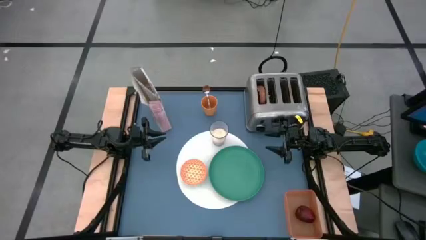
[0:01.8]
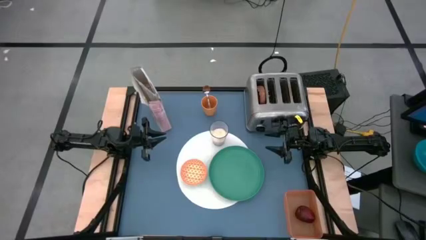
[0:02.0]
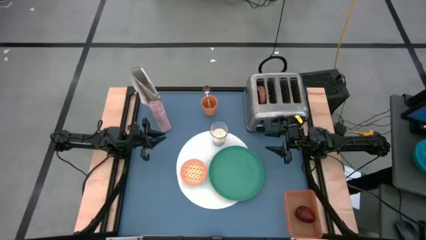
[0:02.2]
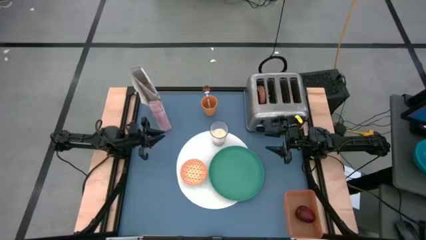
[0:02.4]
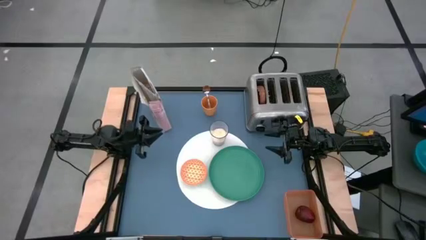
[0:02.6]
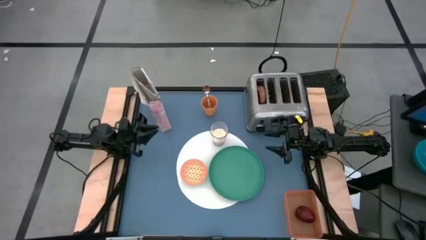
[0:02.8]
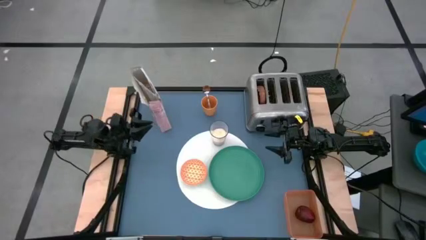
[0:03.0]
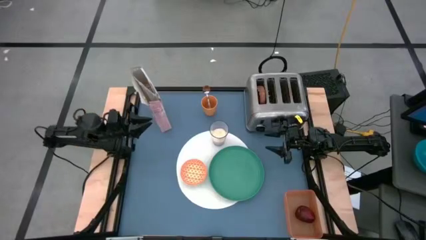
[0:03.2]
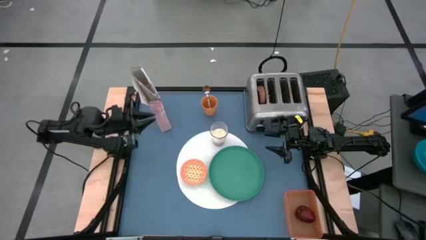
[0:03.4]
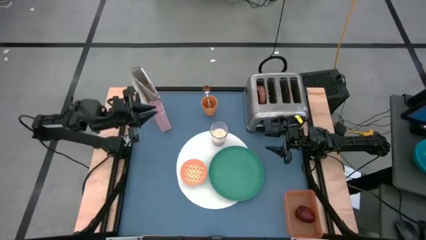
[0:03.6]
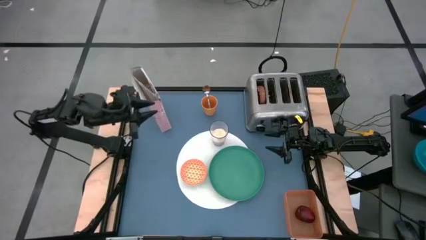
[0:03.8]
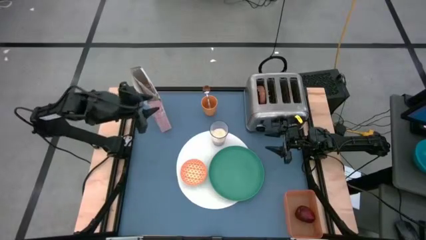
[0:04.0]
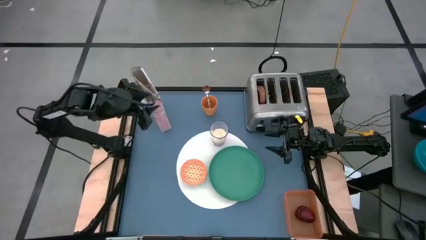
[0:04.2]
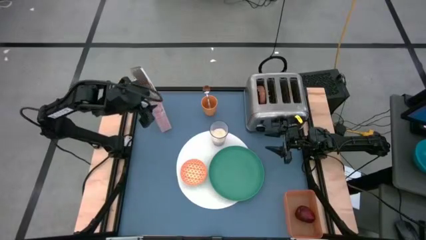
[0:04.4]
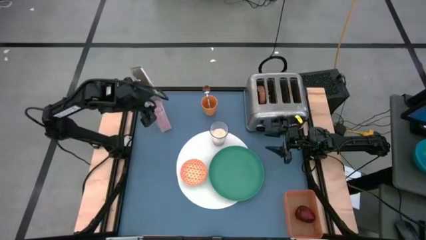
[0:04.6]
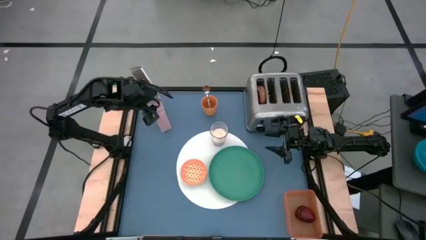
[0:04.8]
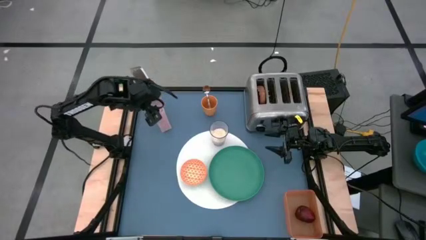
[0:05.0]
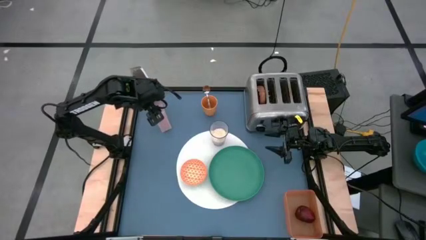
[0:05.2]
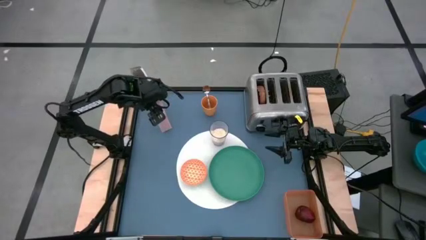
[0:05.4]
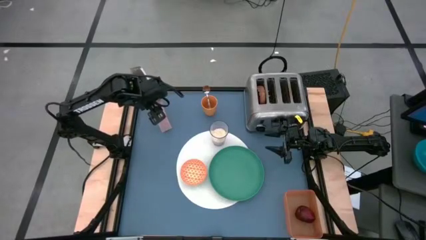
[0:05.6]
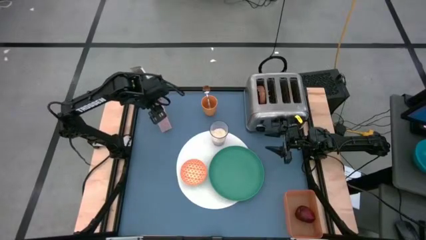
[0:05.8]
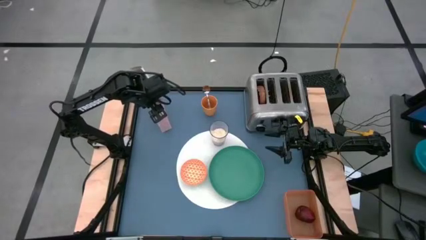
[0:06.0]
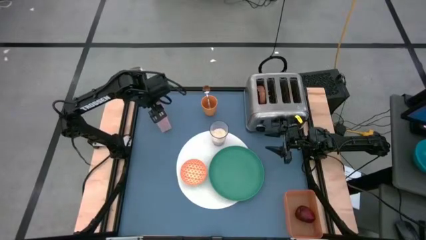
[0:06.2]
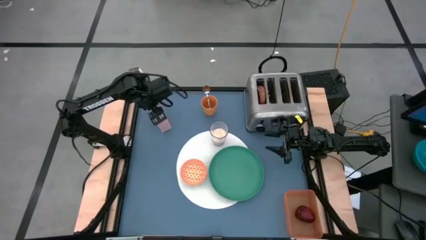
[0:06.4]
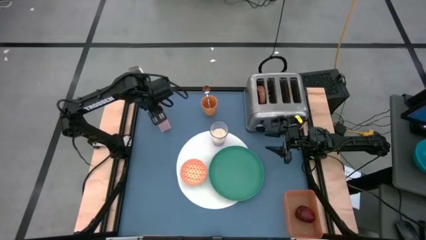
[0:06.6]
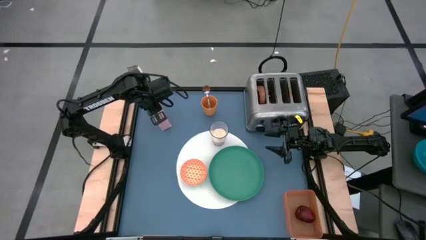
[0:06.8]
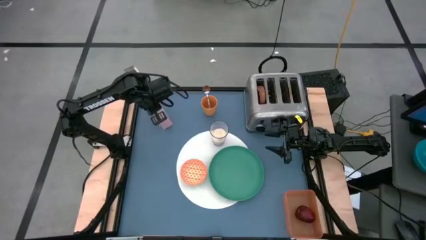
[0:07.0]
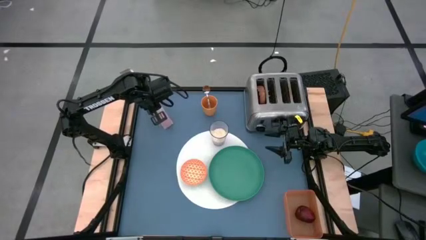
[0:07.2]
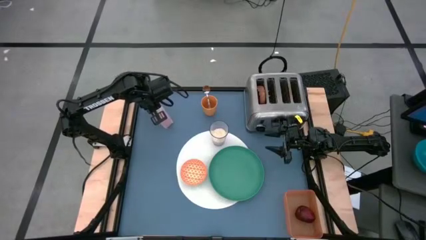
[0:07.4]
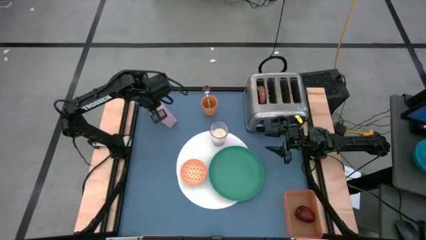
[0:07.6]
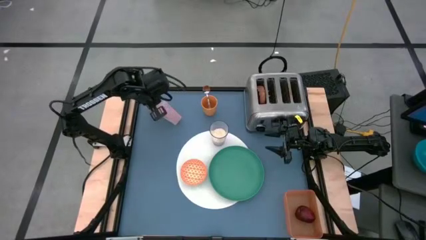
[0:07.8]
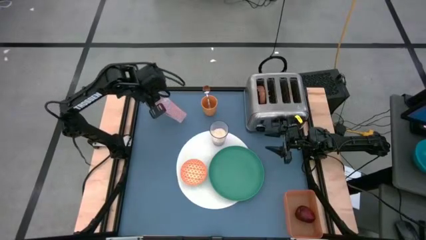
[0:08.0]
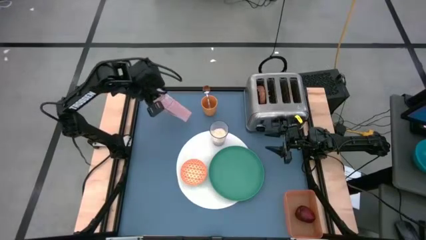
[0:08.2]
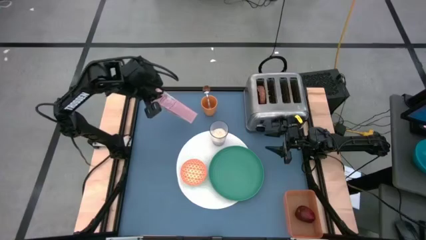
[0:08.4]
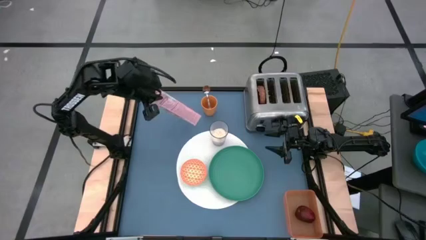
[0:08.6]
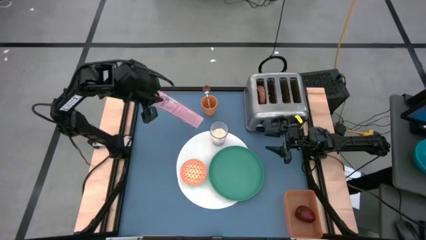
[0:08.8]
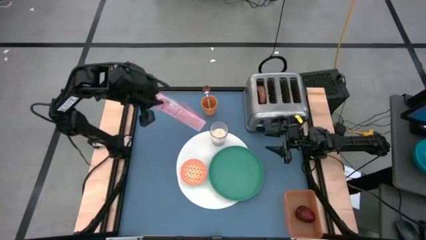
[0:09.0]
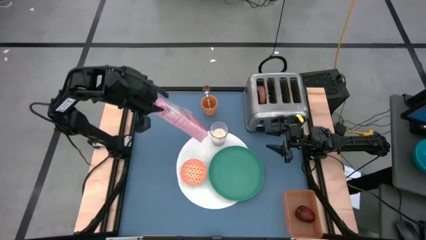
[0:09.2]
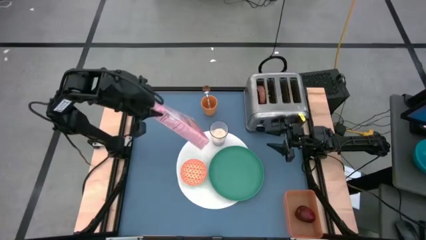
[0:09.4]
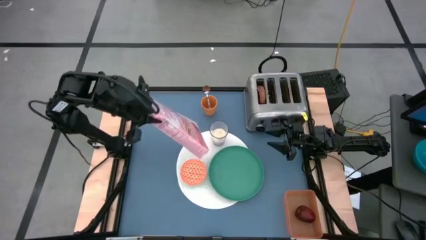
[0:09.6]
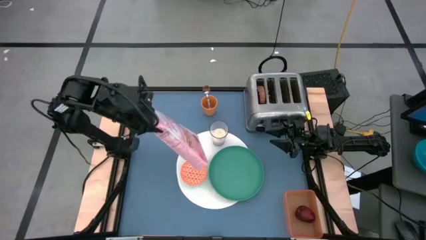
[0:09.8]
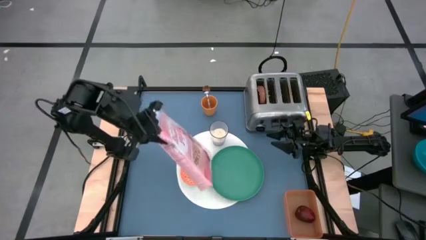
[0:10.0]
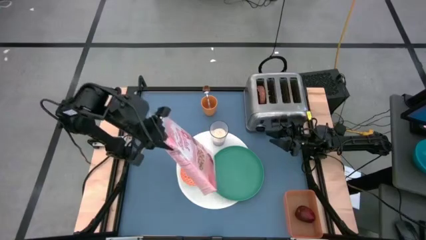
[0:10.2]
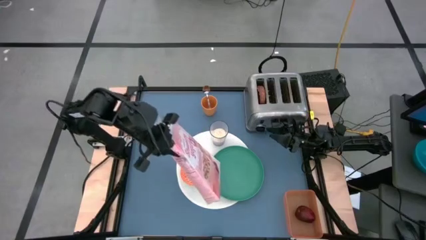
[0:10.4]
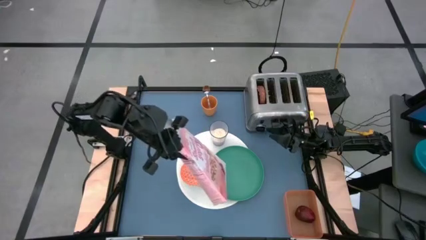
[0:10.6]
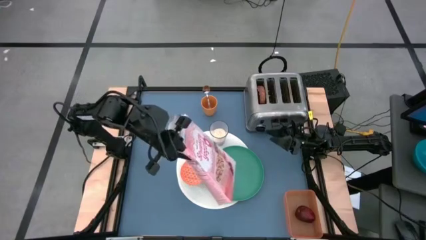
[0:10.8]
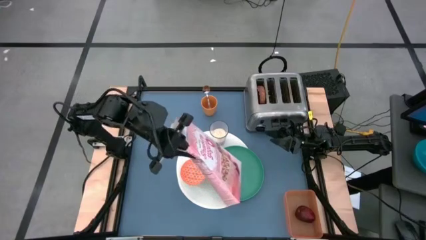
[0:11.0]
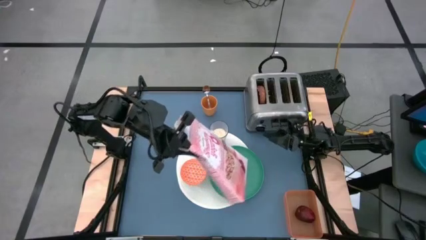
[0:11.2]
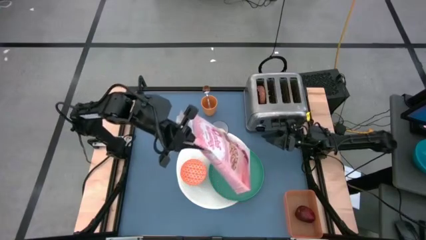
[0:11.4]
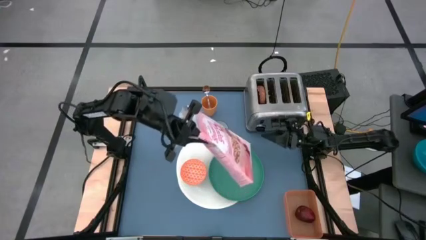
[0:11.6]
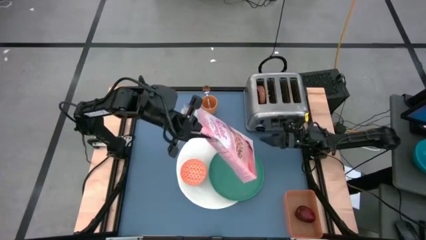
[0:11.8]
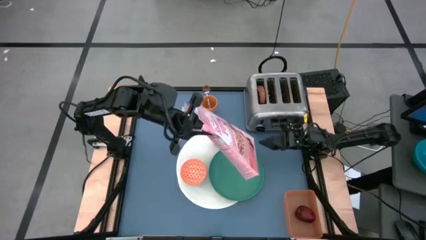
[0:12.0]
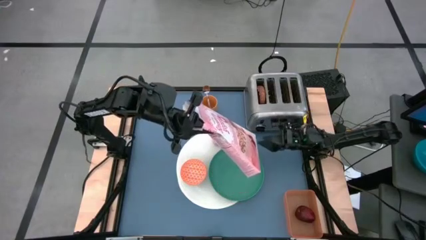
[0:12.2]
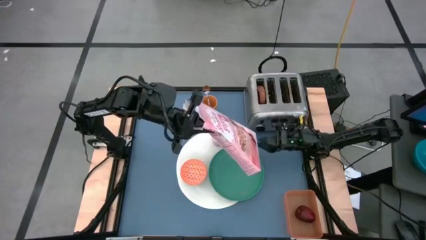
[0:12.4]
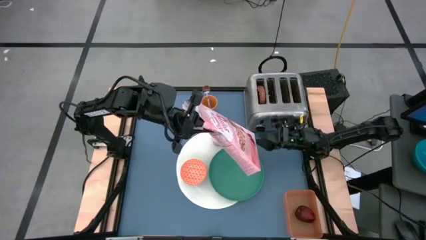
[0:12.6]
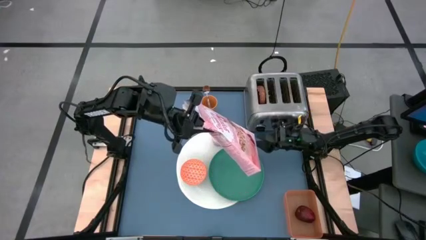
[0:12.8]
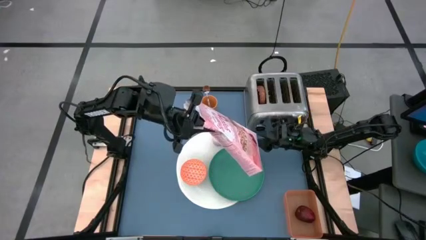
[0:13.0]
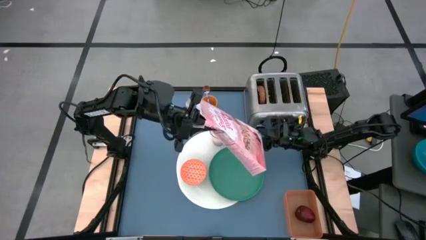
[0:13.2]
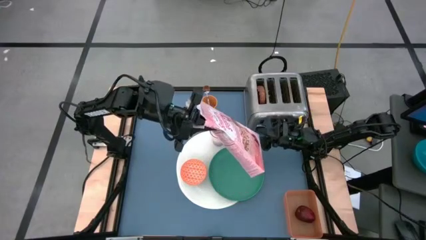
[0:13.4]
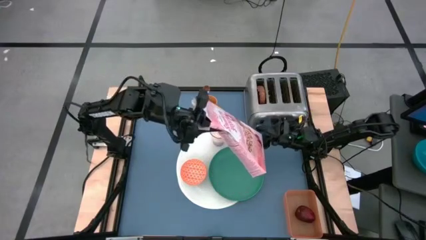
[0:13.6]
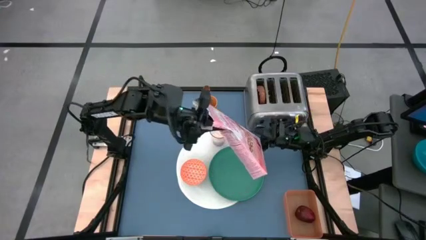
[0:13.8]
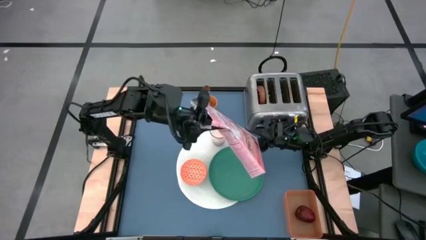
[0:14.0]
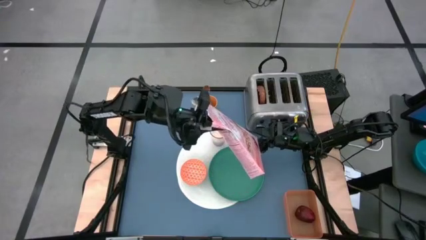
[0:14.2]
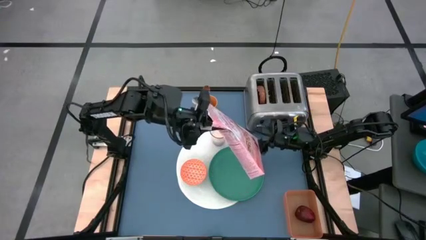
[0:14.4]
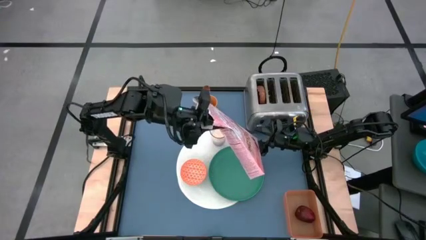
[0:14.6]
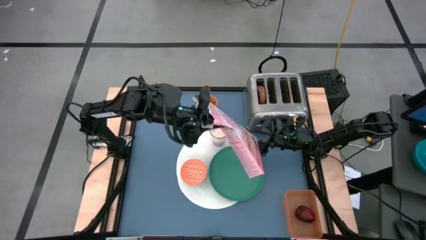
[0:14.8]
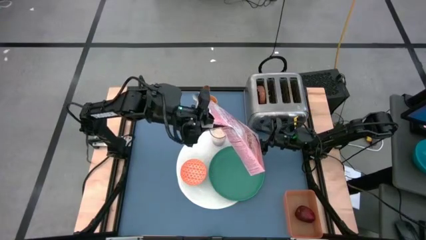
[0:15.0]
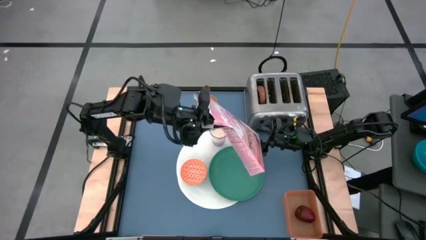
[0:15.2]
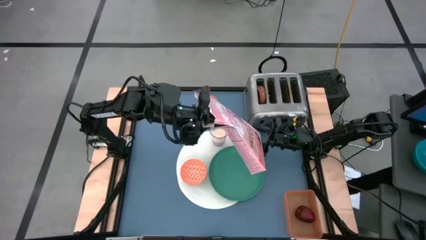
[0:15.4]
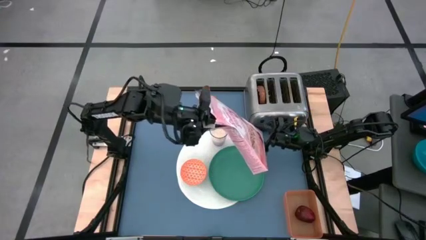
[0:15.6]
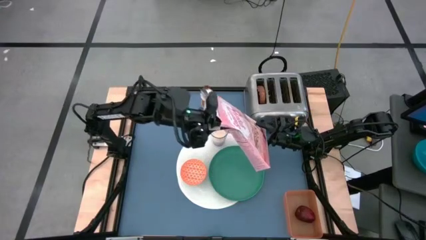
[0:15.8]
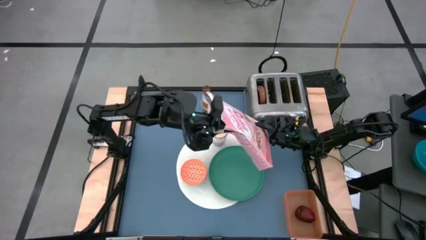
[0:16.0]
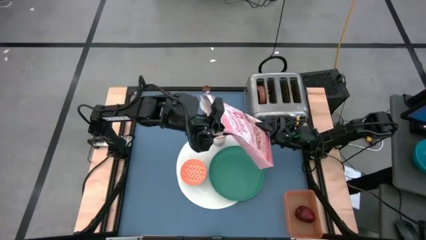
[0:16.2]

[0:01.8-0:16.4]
Task: Arrange a breakfast setting
Pour the cereal into the orange bowl
